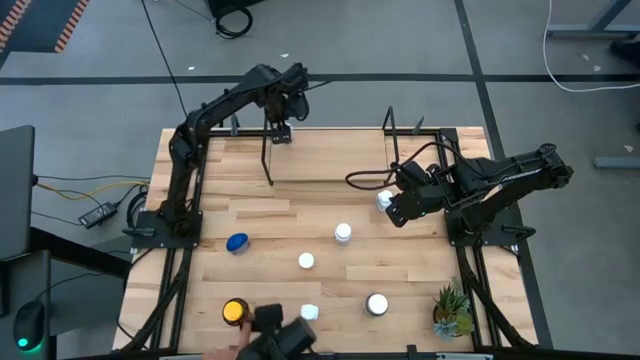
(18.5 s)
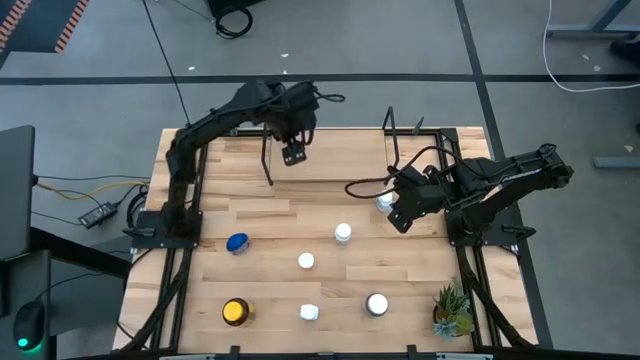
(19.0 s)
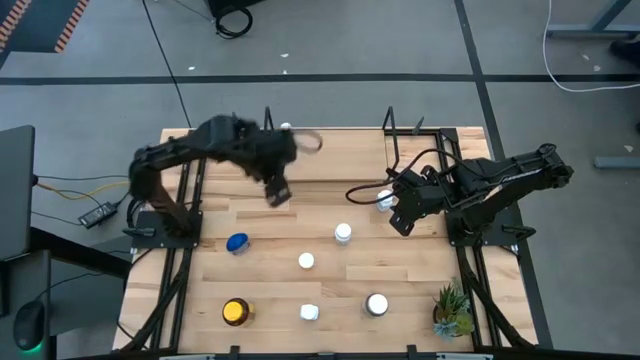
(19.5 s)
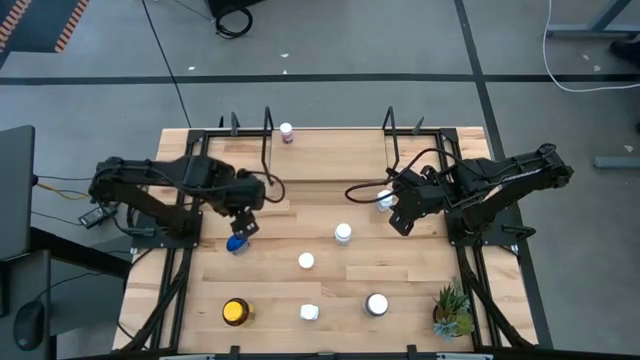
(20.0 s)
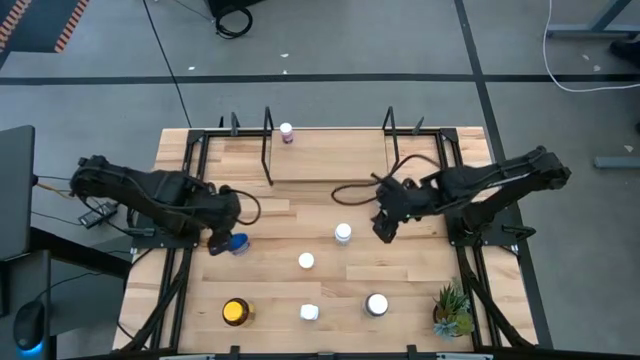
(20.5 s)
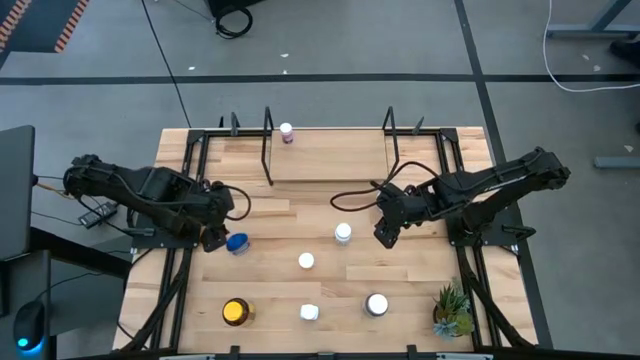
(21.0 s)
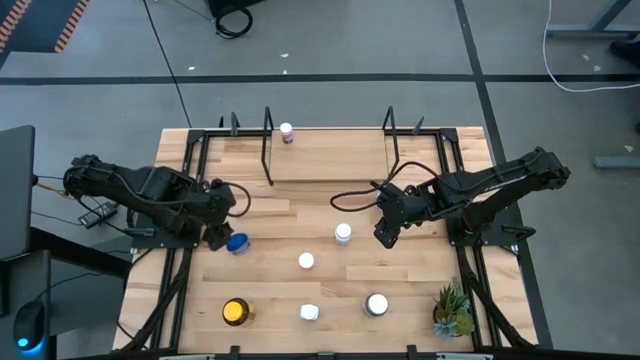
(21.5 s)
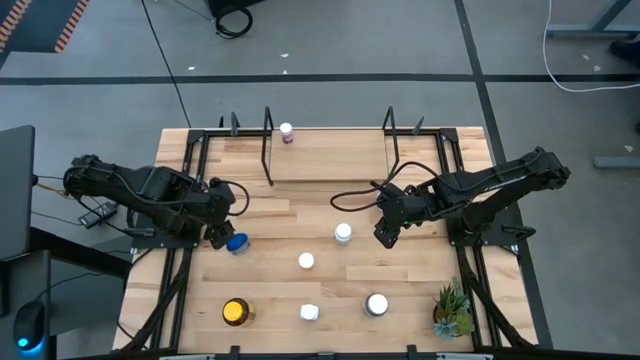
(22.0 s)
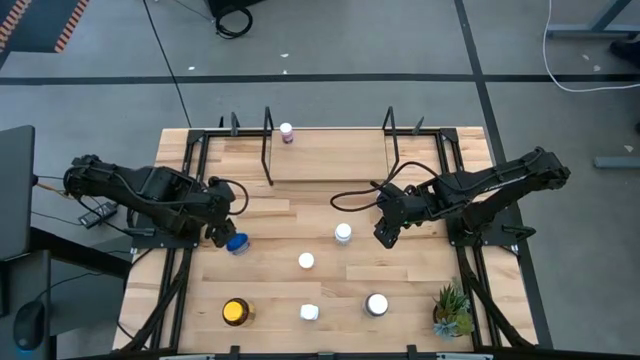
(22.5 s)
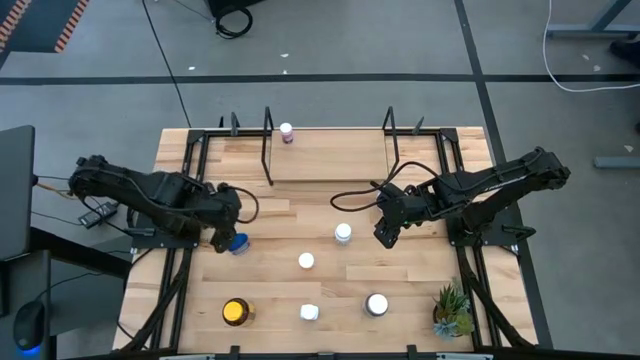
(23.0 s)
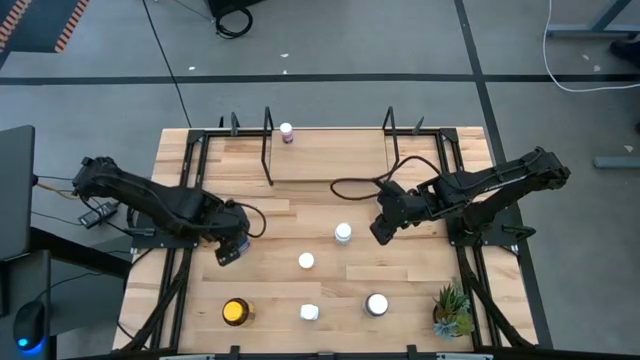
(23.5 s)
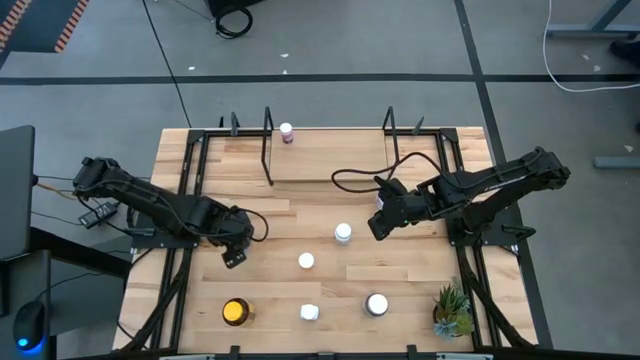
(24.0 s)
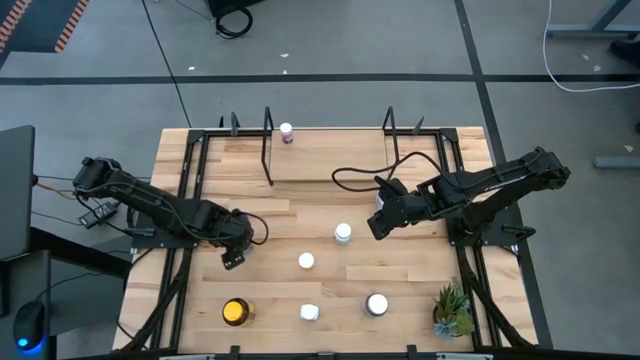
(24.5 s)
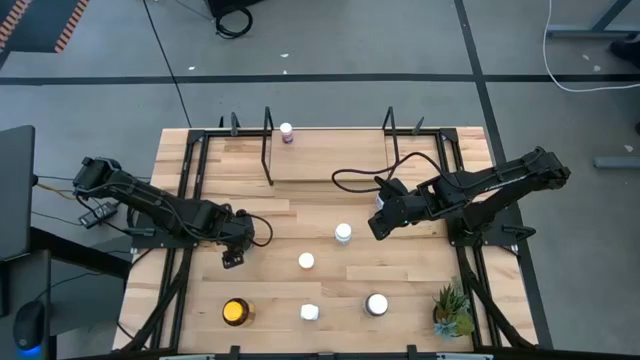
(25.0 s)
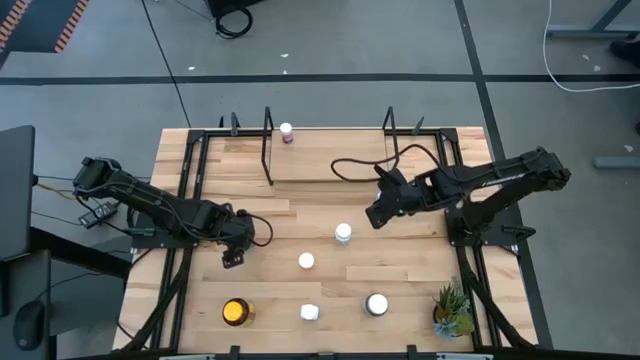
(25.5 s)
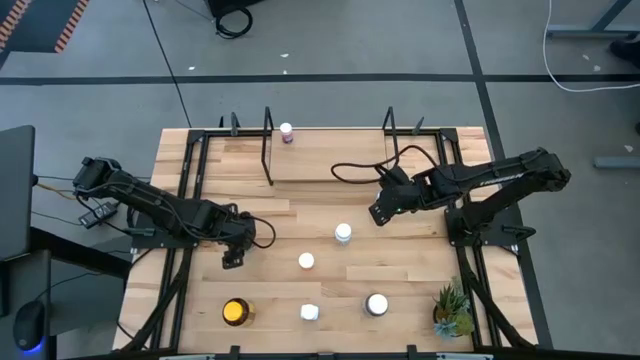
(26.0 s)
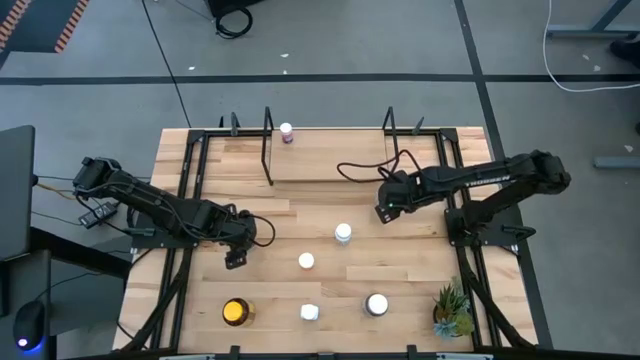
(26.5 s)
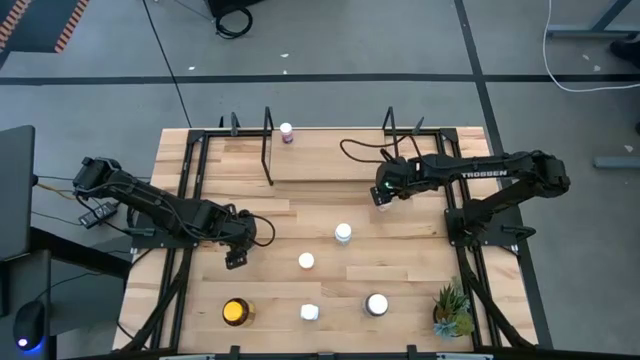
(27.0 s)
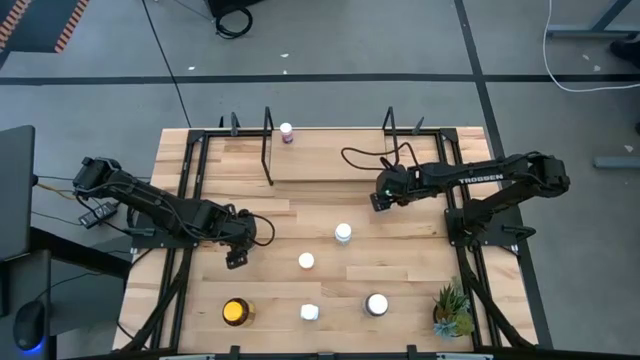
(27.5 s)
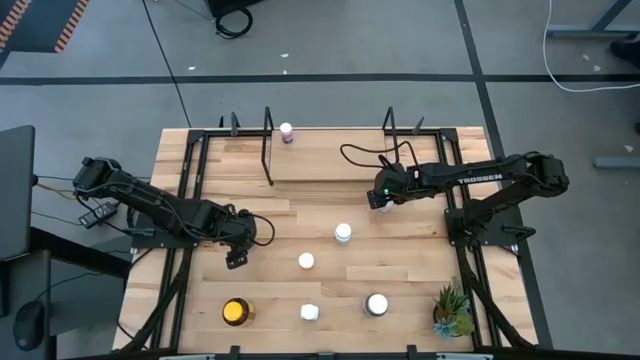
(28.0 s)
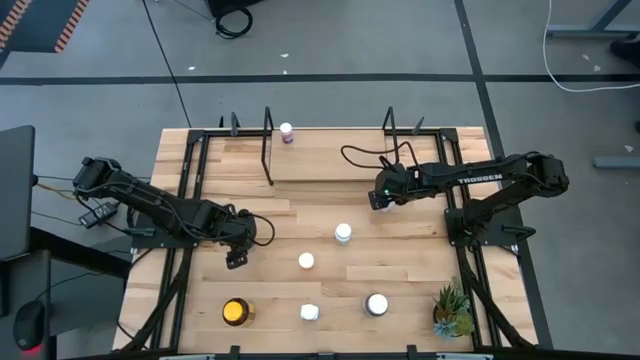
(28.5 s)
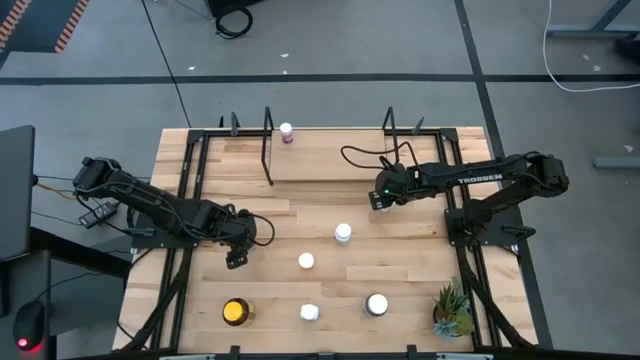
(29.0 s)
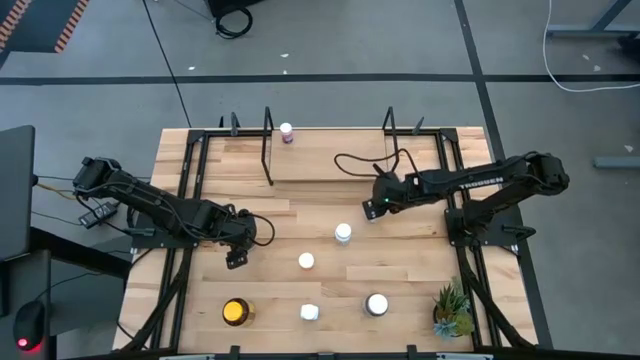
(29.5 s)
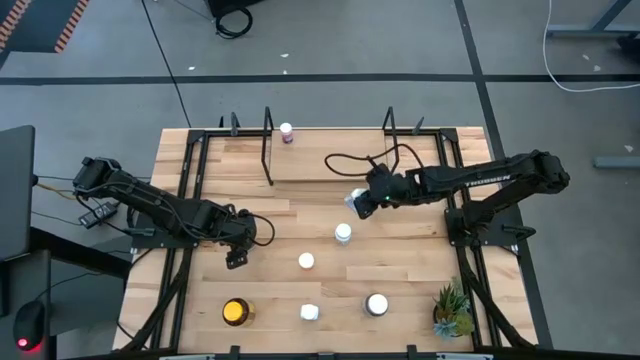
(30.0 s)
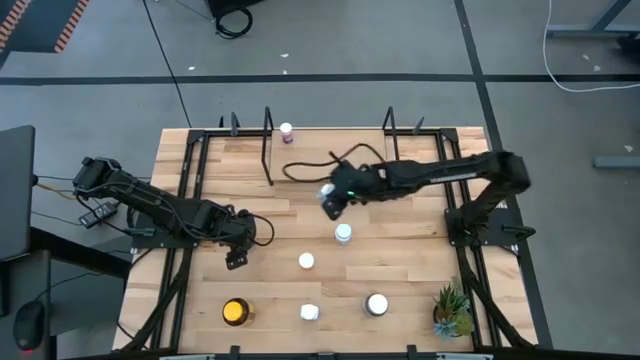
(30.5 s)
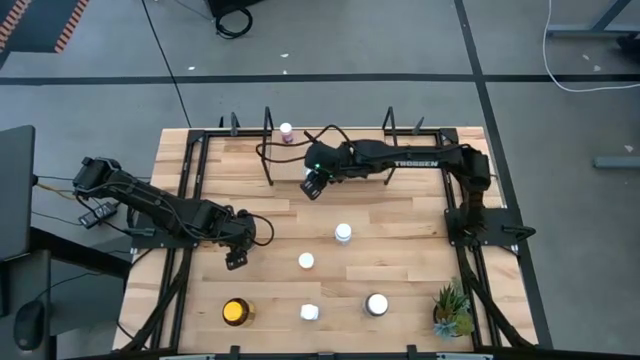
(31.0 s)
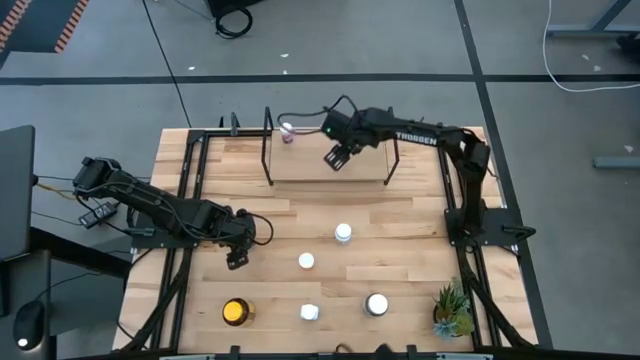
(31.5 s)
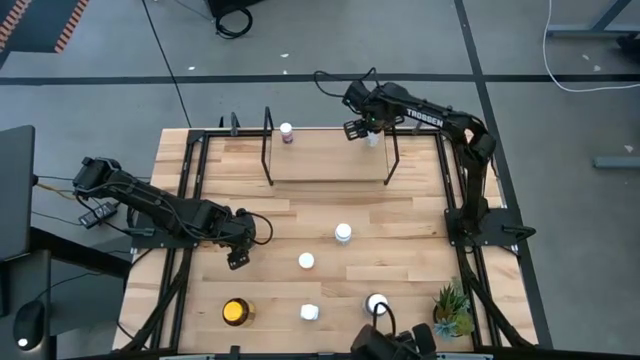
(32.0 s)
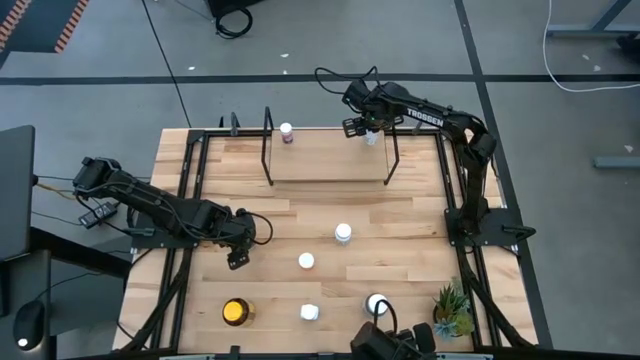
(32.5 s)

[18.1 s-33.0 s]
Task: Pick and place medicine bottles onto shelf by color
Put the top right white pill bottle on the shelf

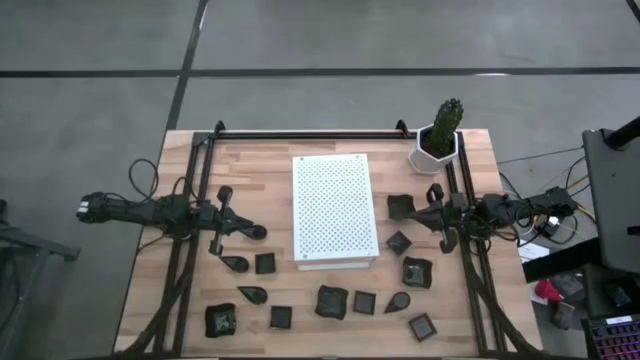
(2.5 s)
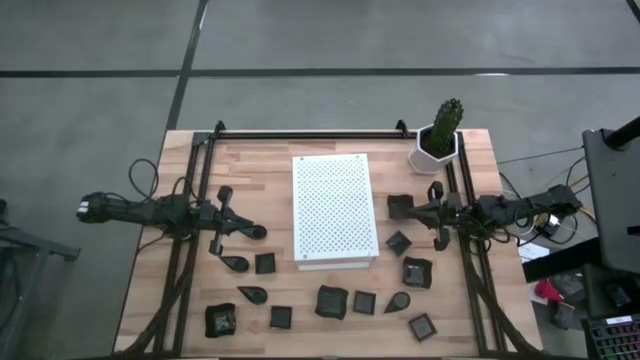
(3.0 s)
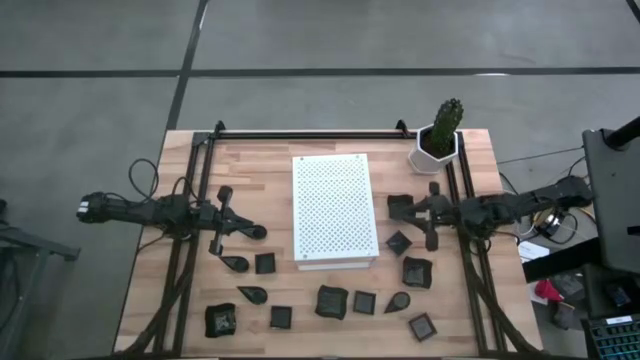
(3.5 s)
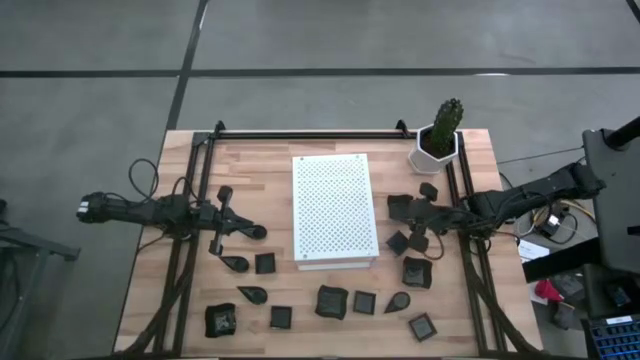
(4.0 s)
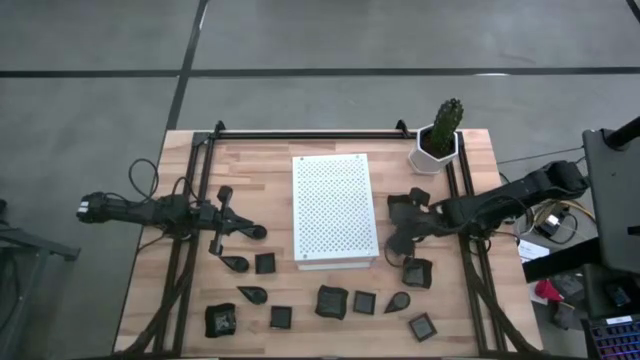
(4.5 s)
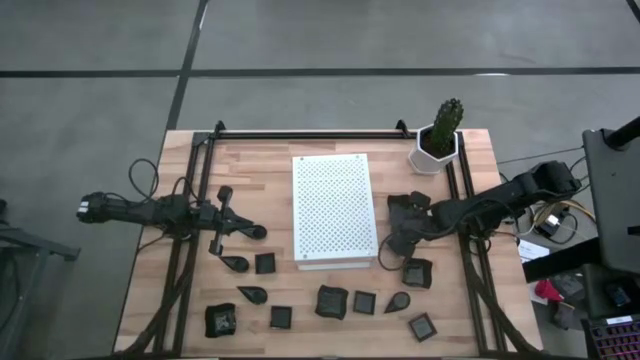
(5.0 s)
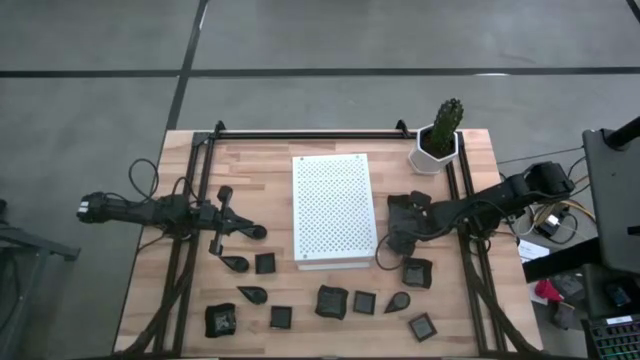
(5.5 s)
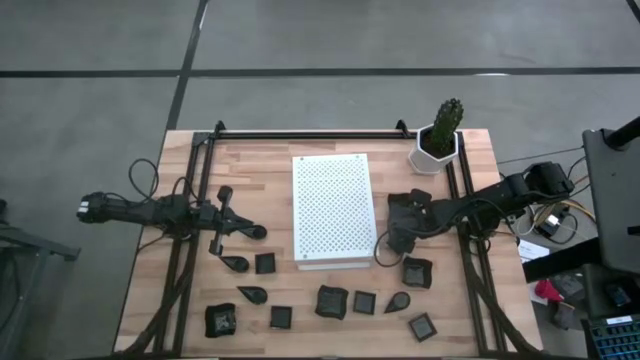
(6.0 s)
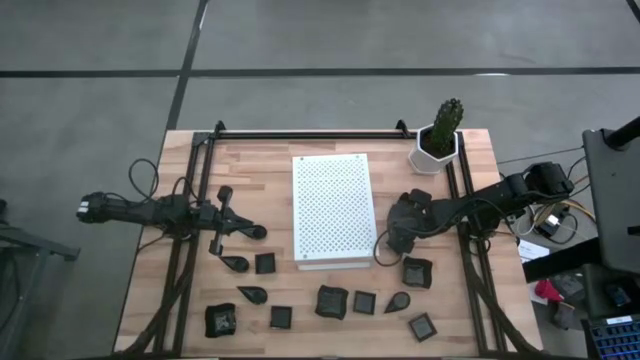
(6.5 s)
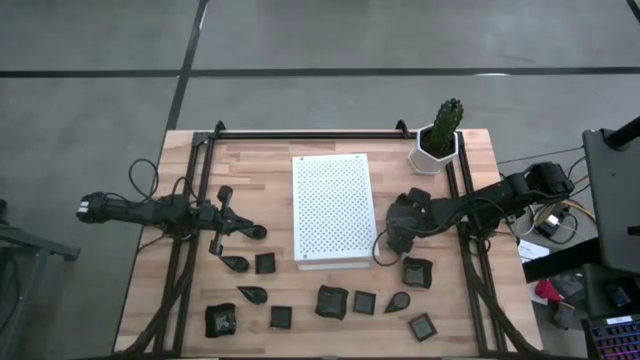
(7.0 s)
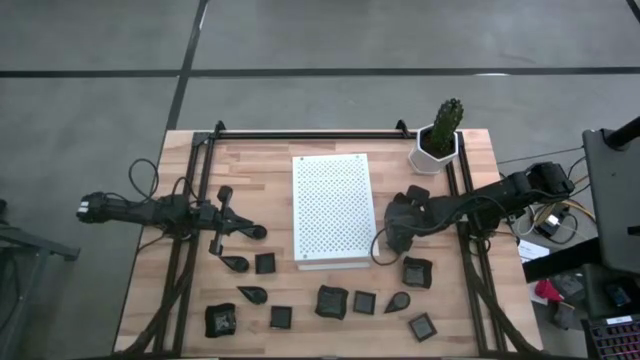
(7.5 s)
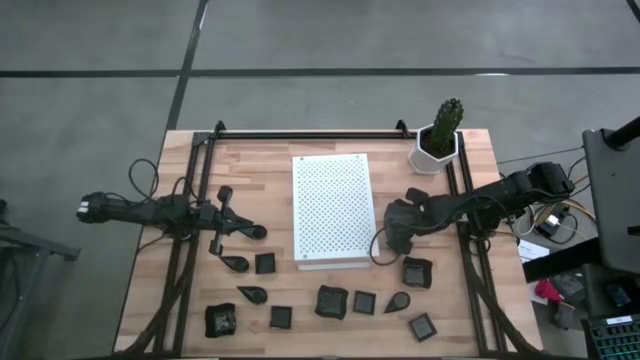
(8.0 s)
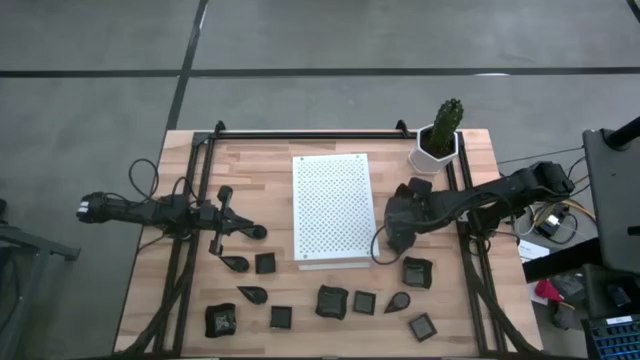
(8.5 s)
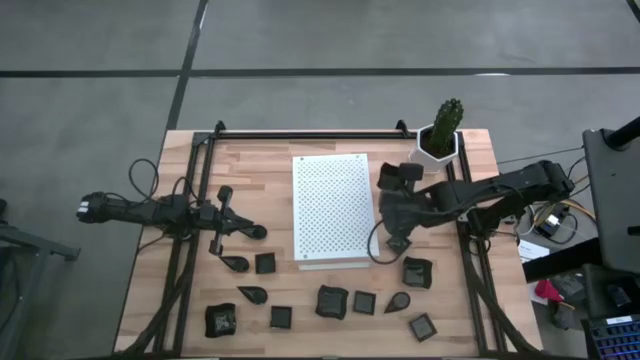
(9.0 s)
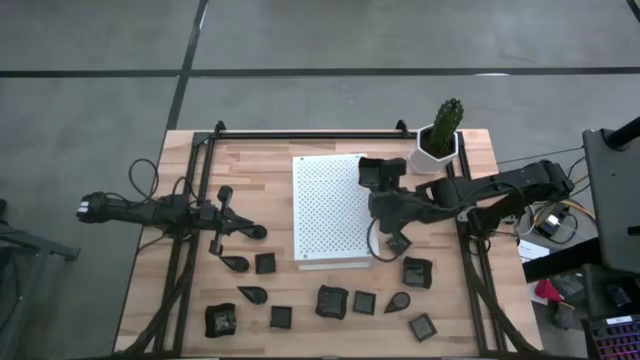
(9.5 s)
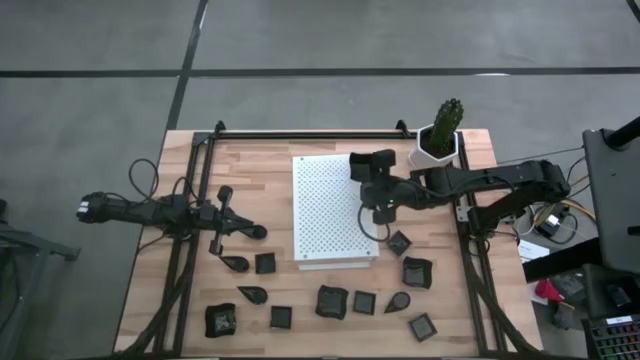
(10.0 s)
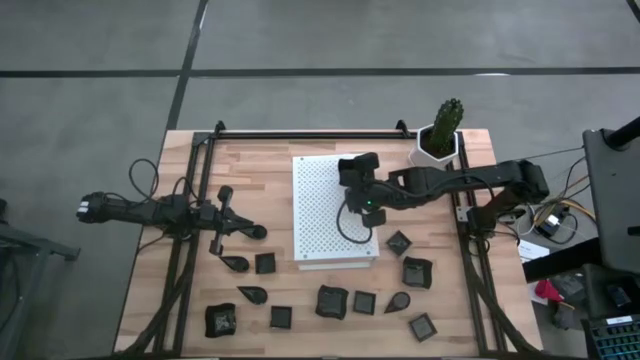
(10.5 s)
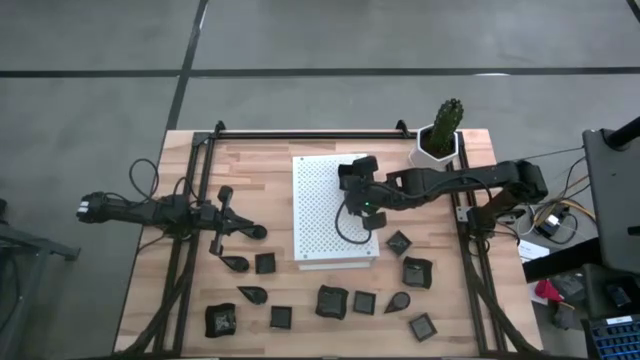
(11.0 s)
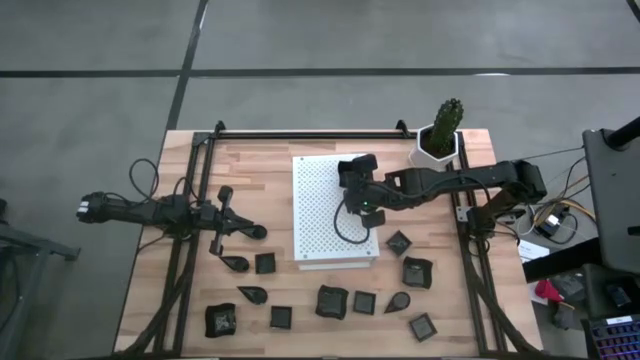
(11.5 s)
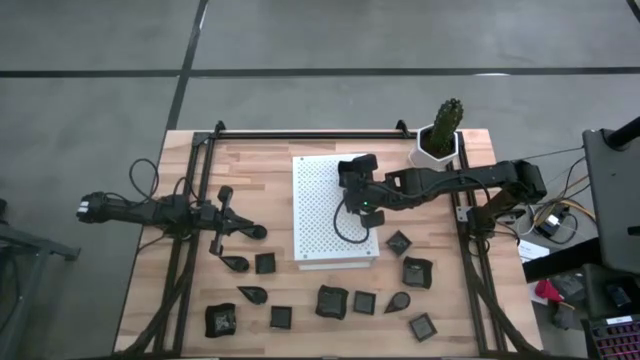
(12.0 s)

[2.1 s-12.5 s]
Task: Pick & Place Mini shaped plates
Put the black distorted square plate on the shelf
